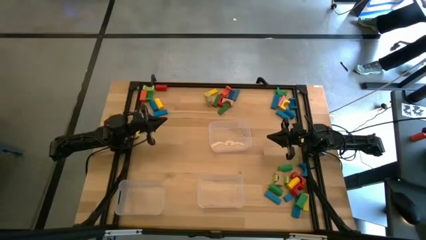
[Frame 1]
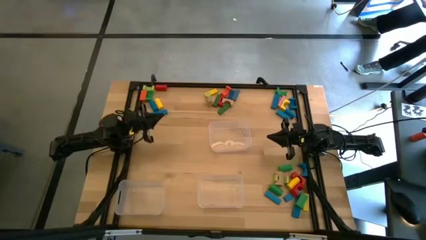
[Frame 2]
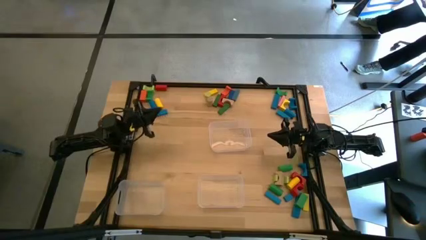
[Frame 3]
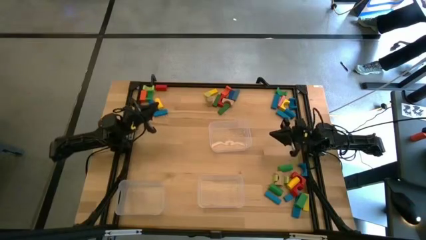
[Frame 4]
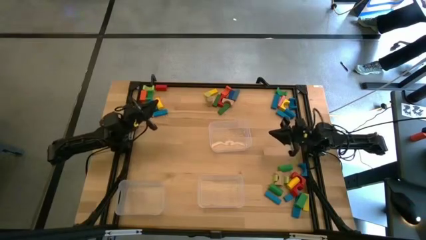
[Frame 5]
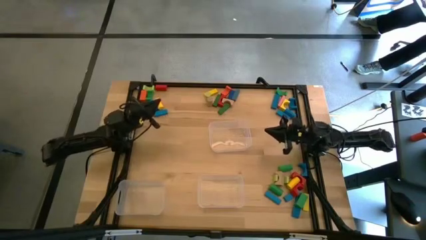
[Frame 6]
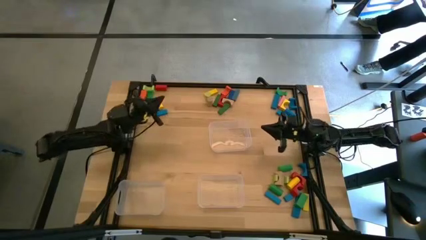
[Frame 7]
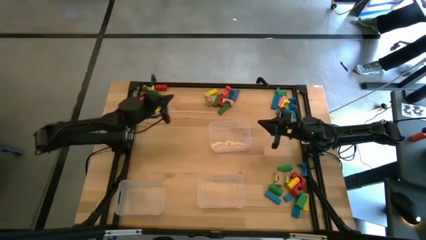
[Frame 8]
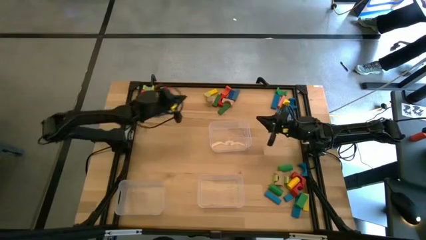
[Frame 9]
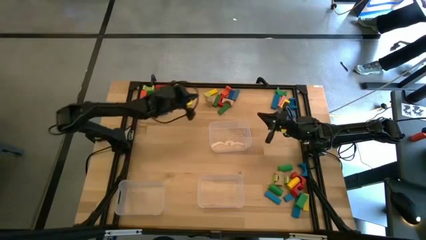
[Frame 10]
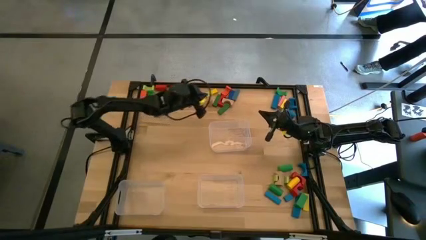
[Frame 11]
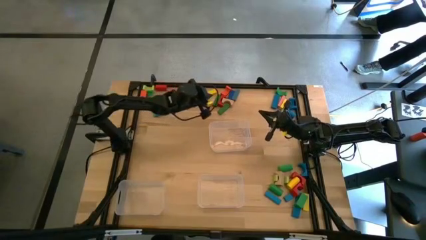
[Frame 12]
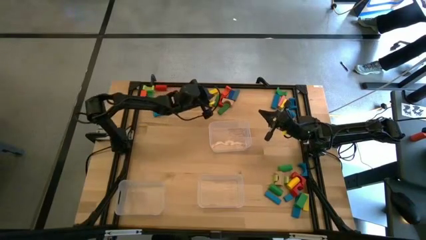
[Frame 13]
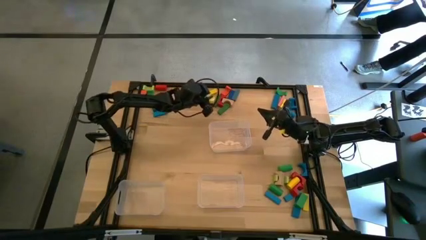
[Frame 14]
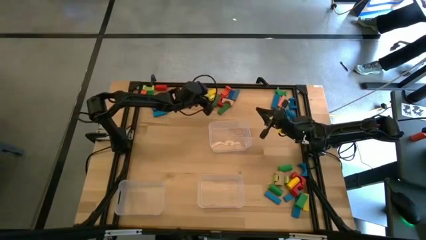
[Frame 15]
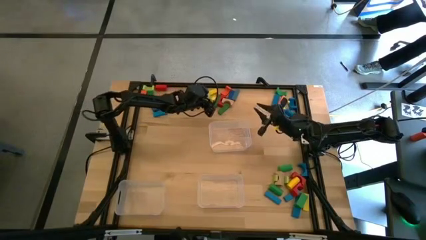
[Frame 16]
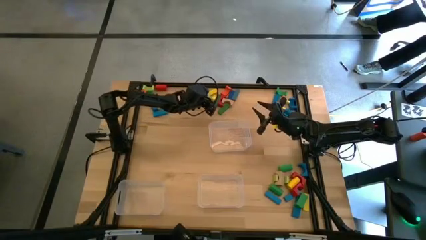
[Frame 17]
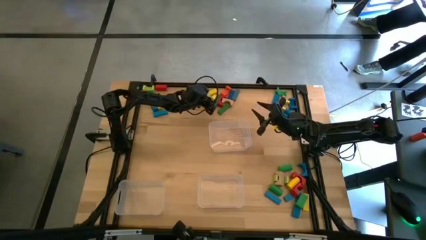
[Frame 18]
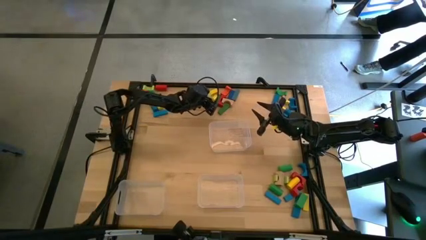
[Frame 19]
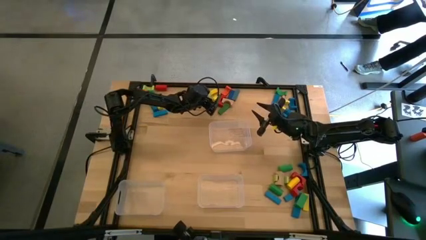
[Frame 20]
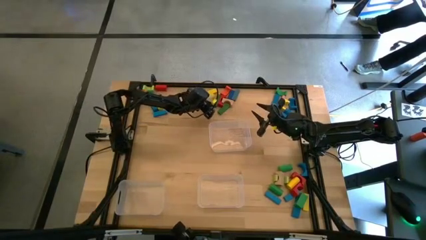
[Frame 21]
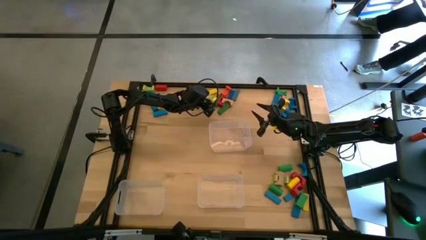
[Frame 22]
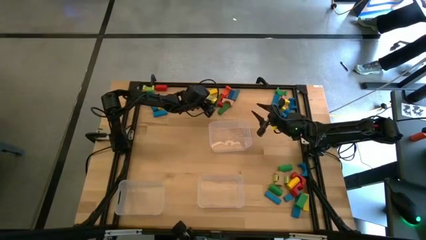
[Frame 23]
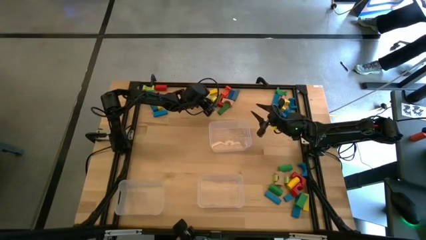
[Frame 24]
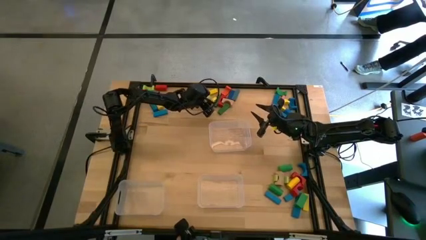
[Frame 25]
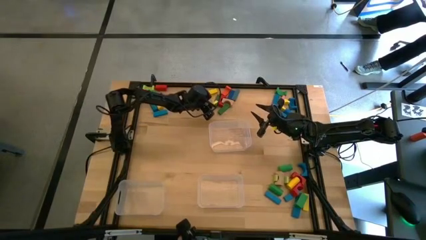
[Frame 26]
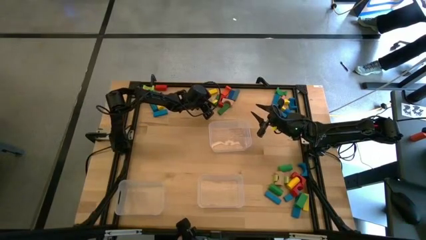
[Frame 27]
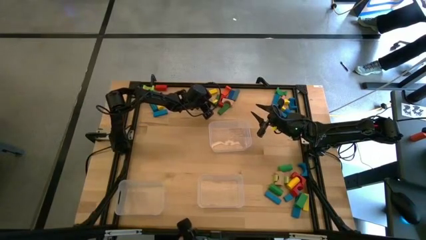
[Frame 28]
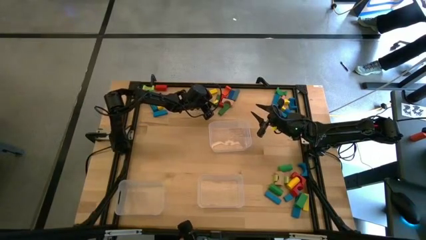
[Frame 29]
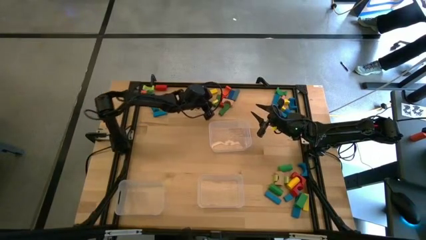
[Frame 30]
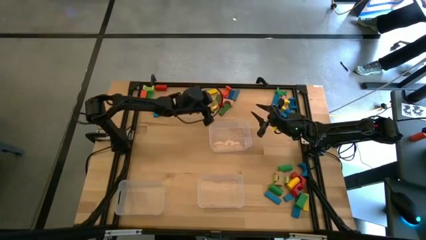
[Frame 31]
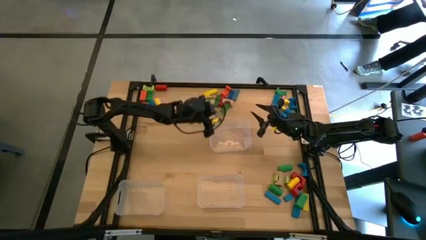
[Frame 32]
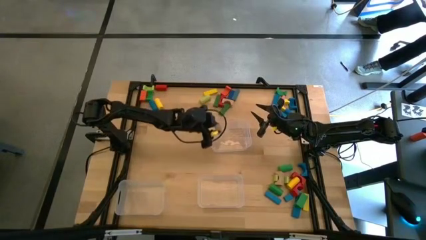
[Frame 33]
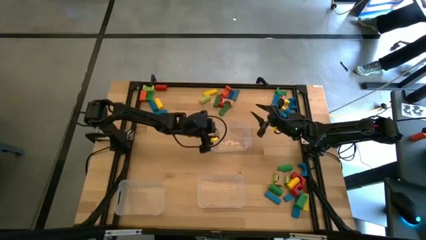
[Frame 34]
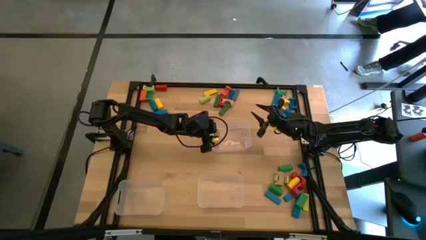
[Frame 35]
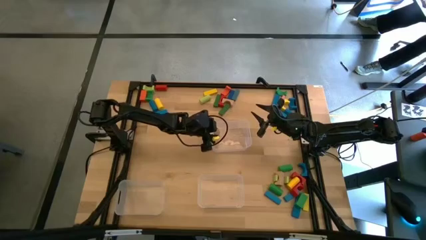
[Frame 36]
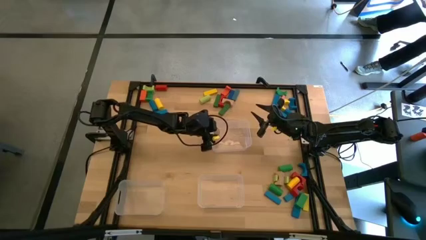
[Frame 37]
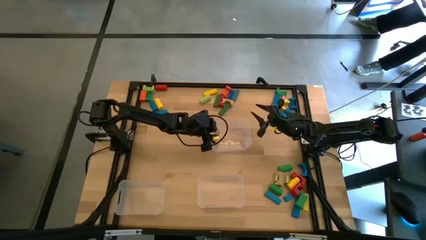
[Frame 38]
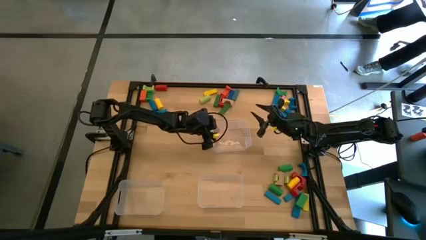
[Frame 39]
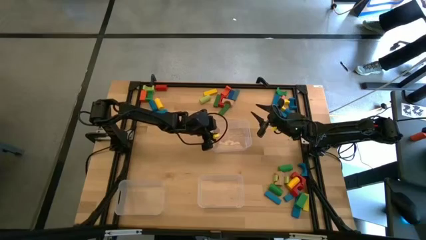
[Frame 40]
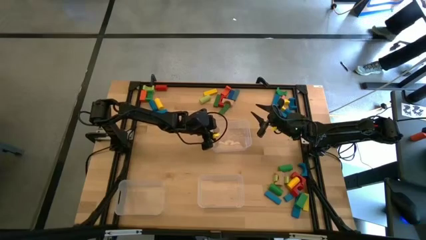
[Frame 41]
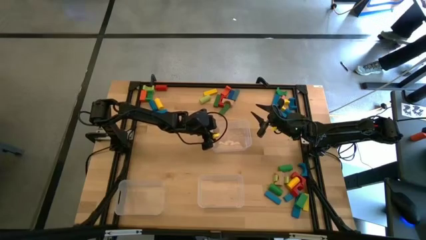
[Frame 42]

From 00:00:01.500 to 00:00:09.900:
Task: Sort blocks by size
Put the brown cylindrical block into the top transparent bin

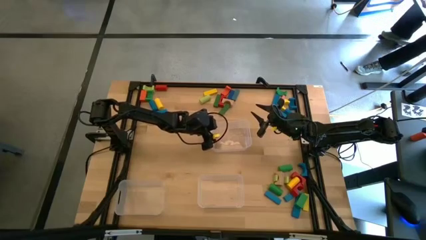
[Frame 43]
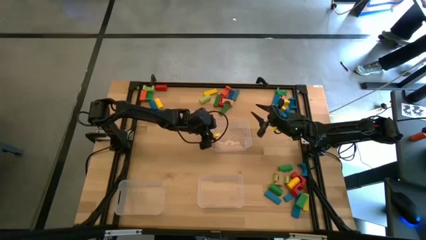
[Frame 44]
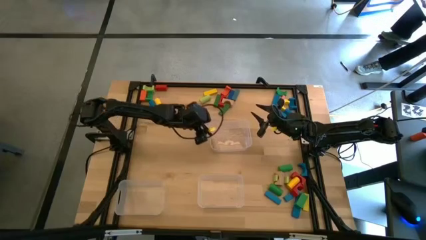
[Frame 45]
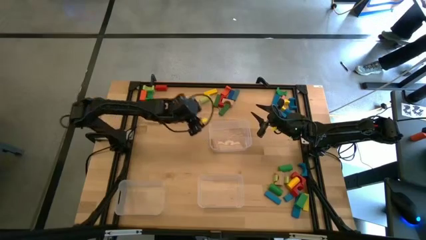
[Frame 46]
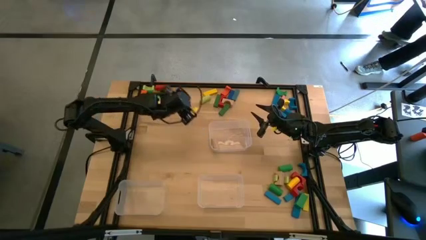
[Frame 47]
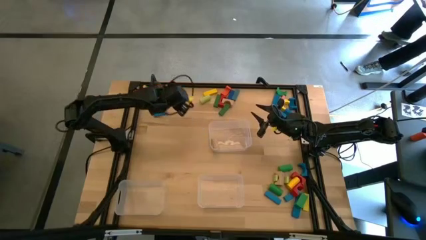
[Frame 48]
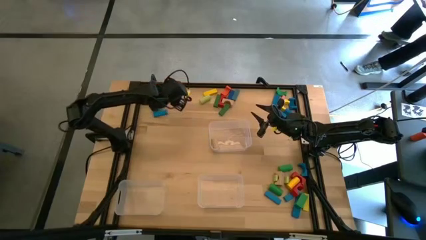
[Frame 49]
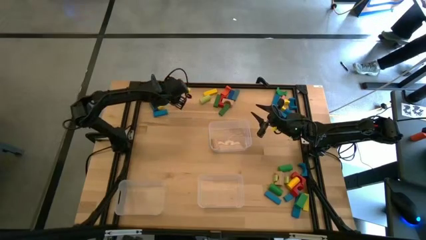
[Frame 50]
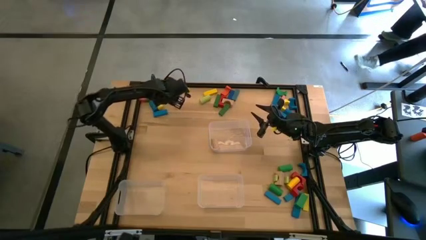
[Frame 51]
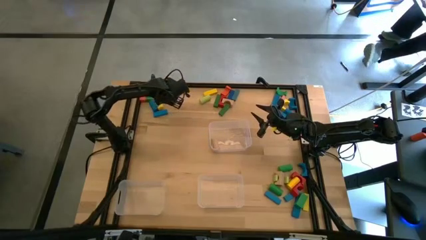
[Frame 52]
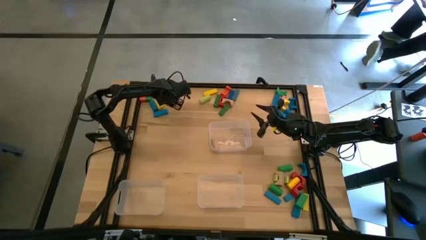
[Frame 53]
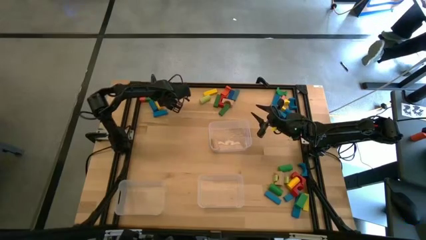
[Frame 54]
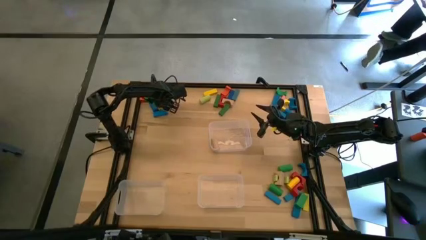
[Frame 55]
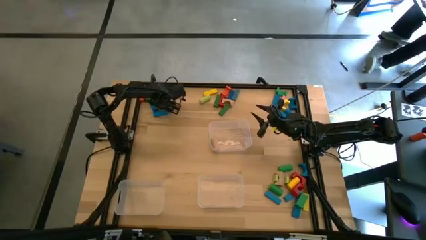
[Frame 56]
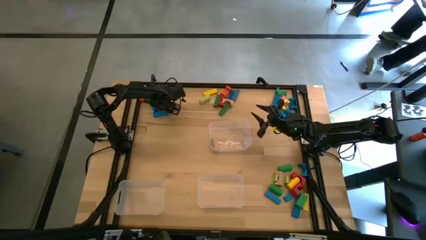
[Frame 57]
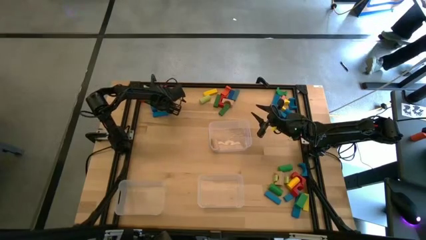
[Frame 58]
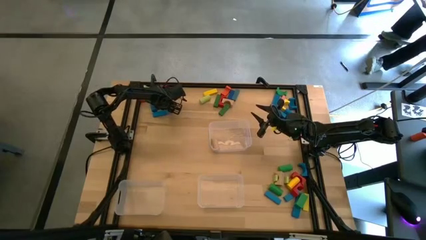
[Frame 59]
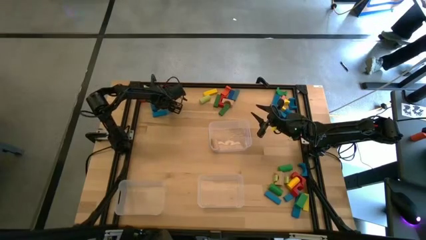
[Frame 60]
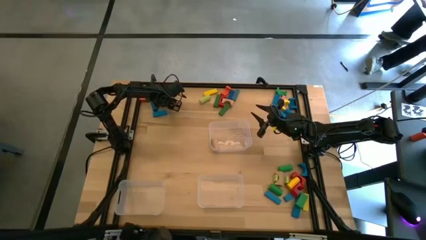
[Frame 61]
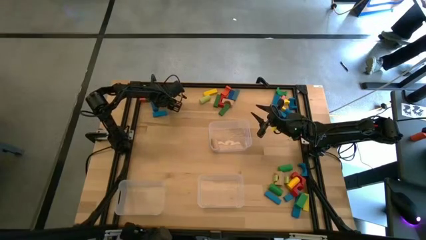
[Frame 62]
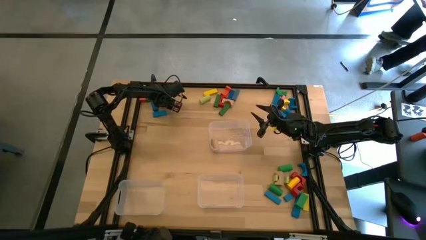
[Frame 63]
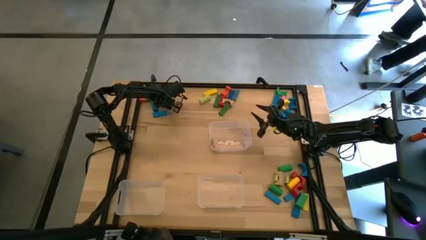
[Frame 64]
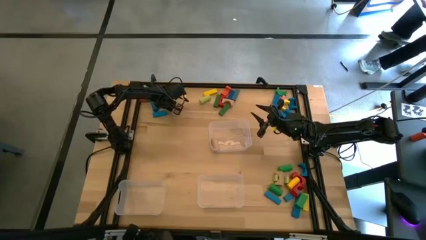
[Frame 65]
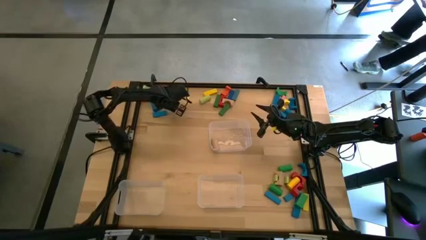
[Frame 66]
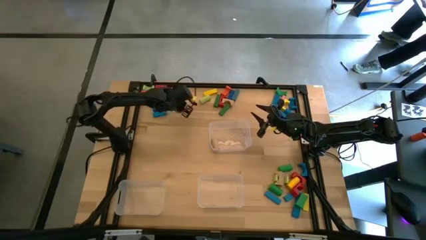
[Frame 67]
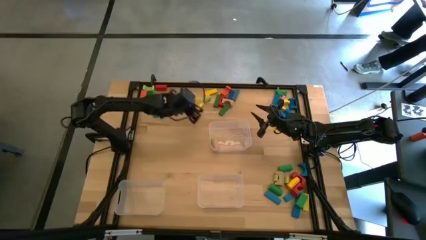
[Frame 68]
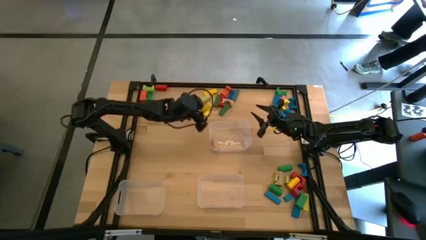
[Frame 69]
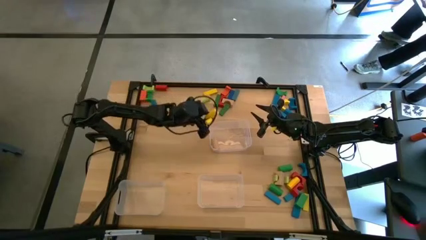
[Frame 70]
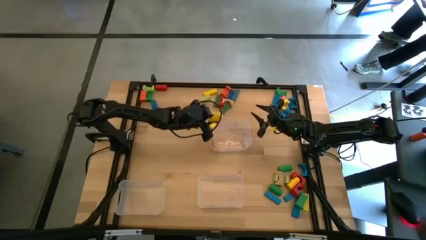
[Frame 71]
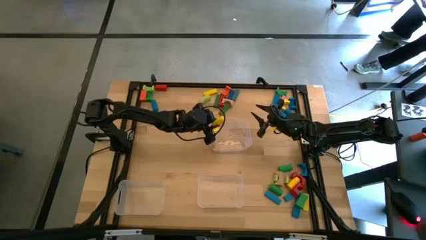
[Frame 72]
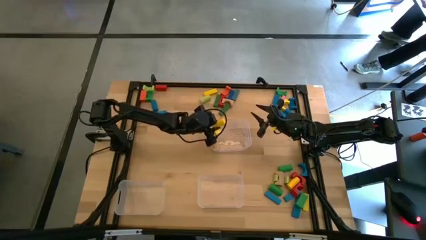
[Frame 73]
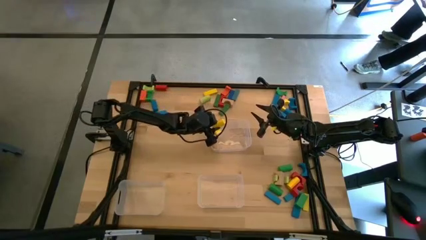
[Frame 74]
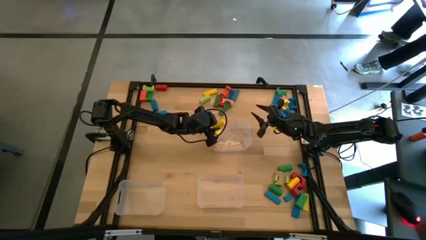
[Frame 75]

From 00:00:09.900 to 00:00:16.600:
Put the yellow cylindrical block into the top transparent bin

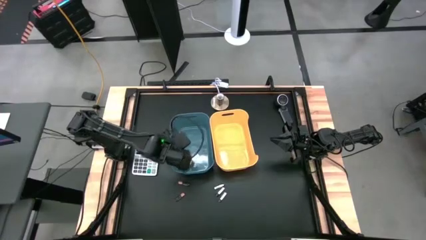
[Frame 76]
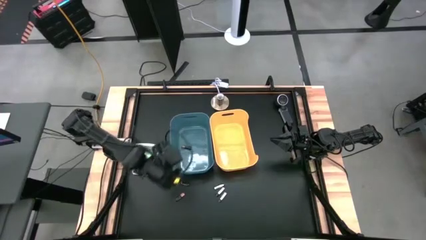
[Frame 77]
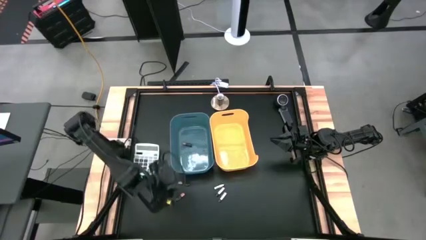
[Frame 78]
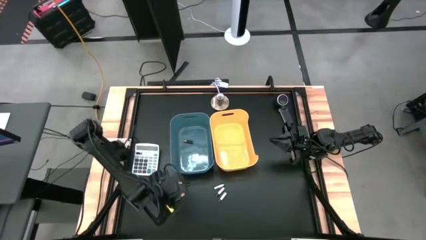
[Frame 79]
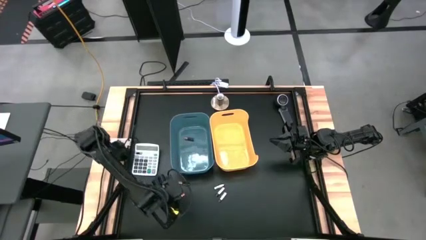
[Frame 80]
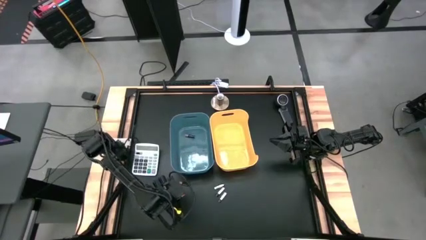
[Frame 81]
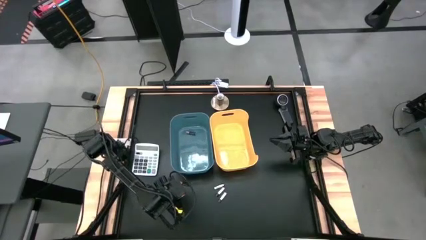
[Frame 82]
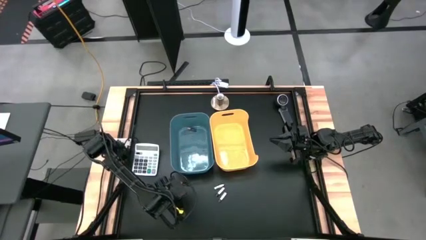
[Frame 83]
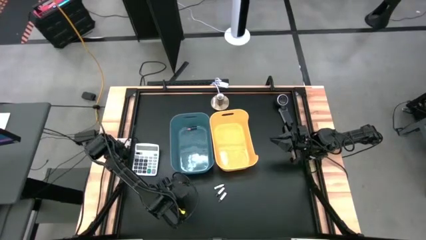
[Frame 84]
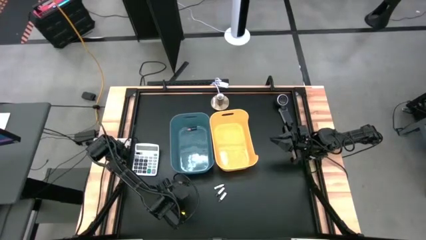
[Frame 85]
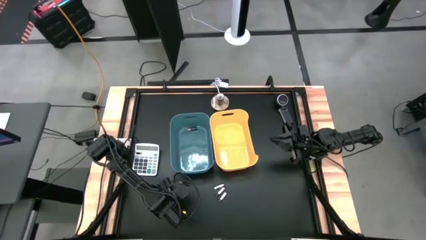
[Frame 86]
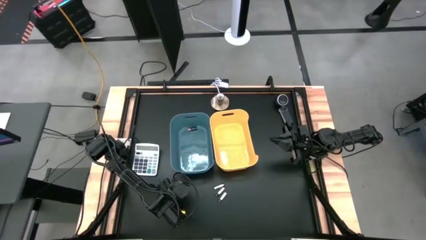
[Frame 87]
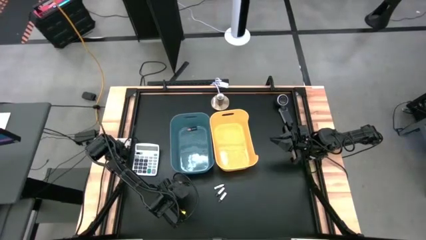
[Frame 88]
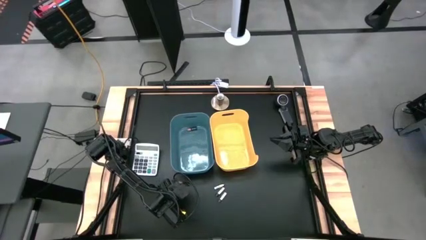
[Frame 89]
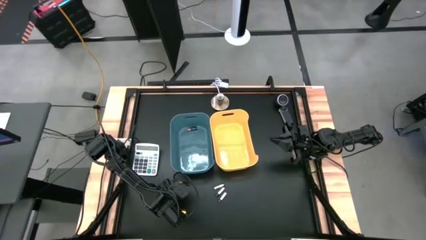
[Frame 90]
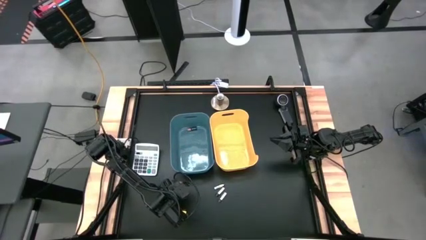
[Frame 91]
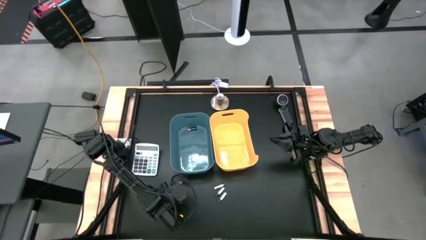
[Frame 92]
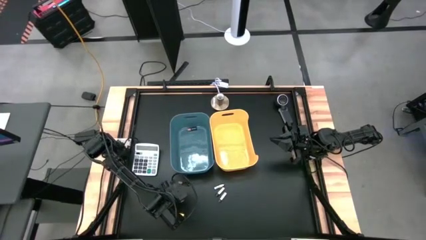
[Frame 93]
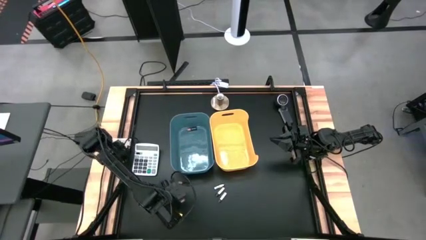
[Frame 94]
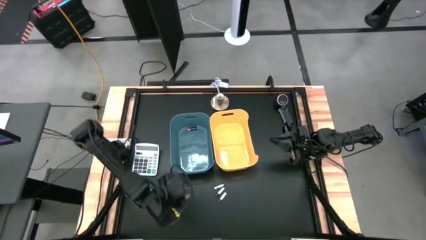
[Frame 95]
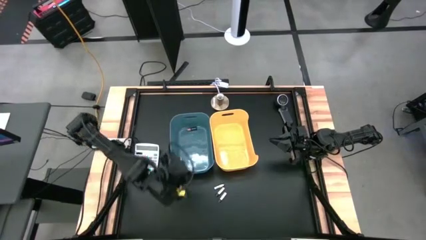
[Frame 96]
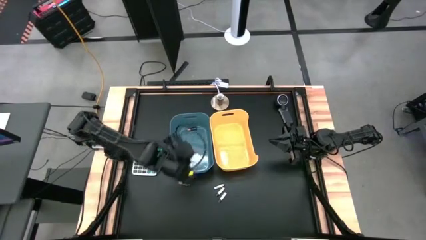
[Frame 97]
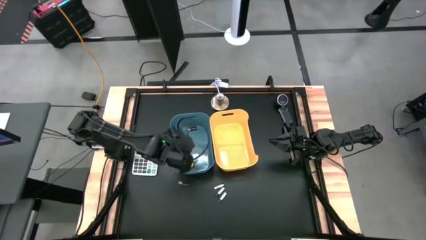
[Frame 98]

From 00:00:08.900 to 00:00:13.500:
Task: Sort batteries
Put the bottom black battery into the blue bin
